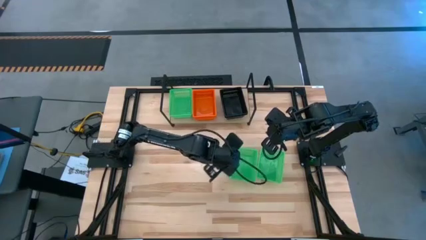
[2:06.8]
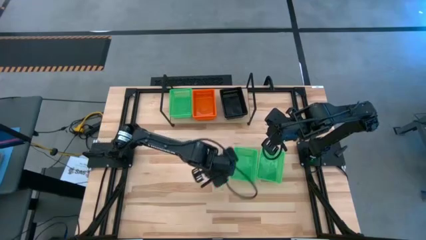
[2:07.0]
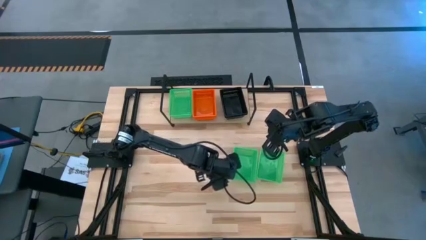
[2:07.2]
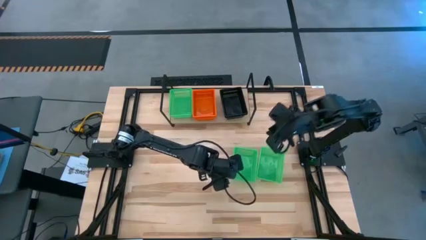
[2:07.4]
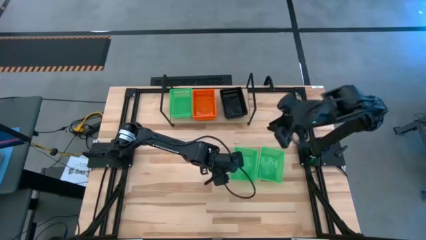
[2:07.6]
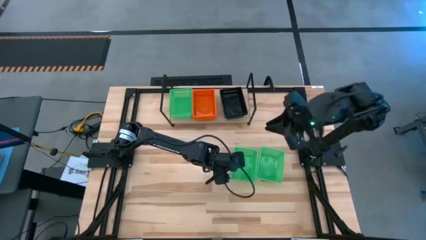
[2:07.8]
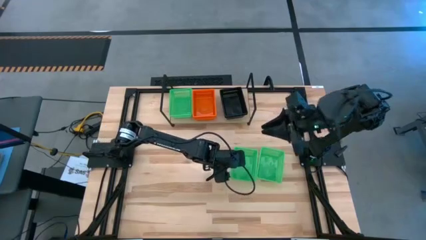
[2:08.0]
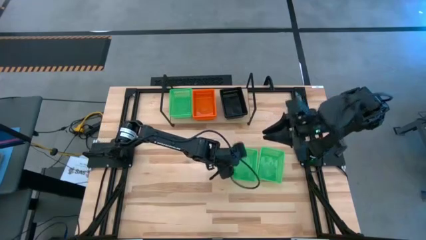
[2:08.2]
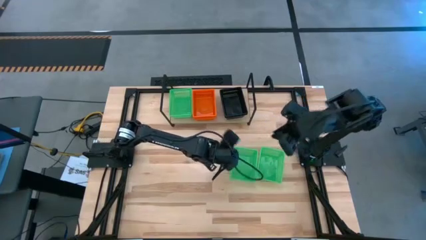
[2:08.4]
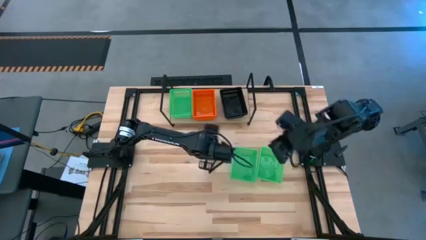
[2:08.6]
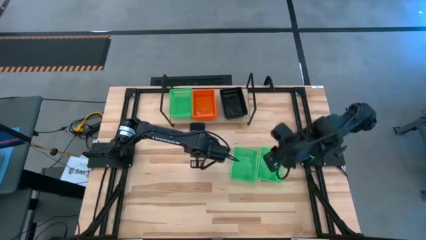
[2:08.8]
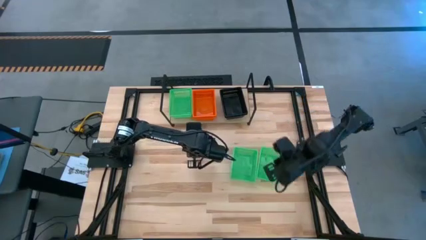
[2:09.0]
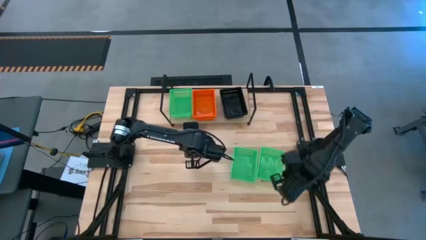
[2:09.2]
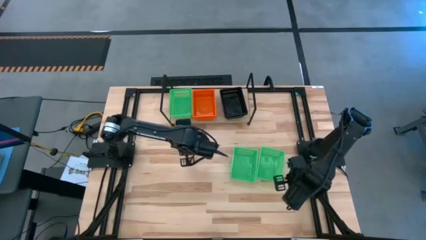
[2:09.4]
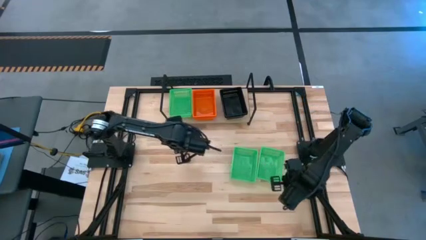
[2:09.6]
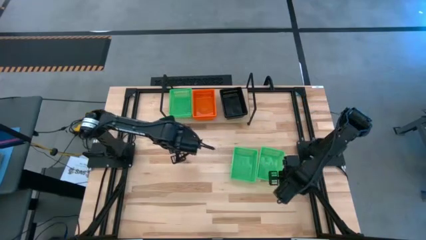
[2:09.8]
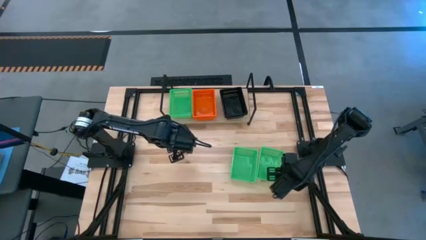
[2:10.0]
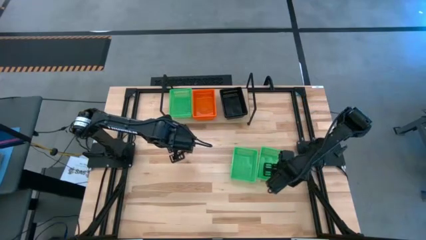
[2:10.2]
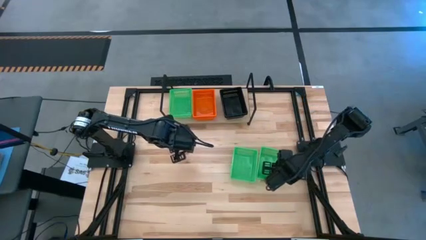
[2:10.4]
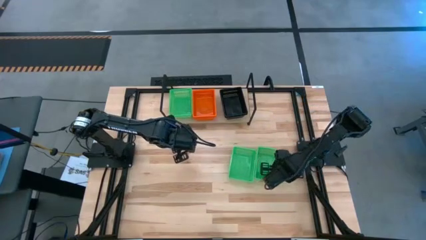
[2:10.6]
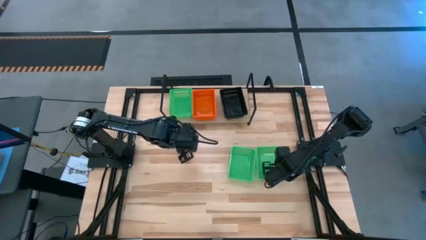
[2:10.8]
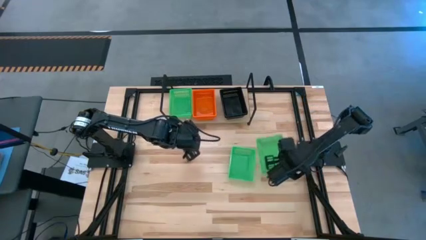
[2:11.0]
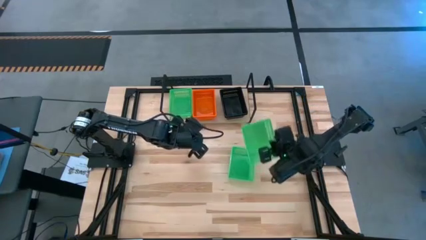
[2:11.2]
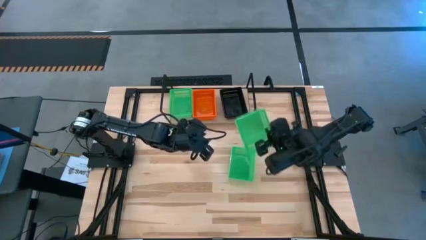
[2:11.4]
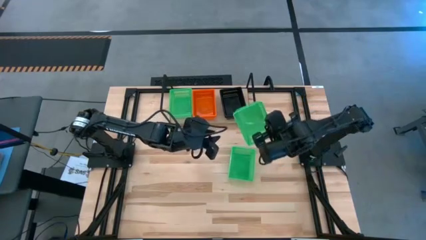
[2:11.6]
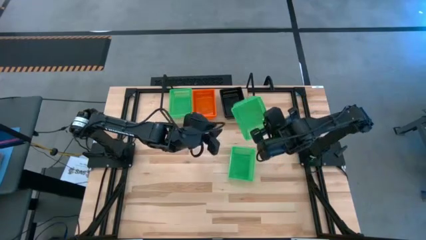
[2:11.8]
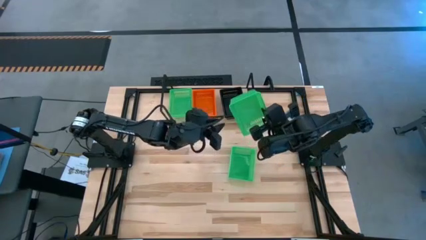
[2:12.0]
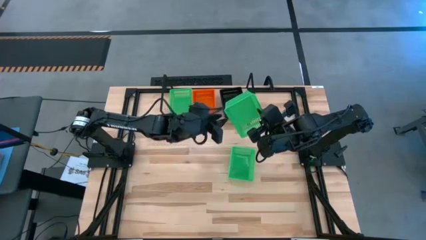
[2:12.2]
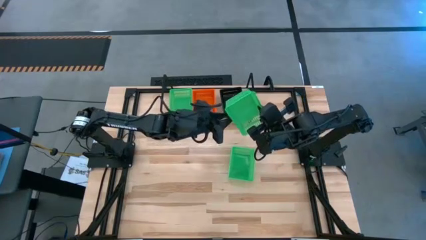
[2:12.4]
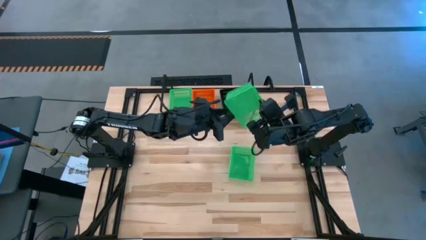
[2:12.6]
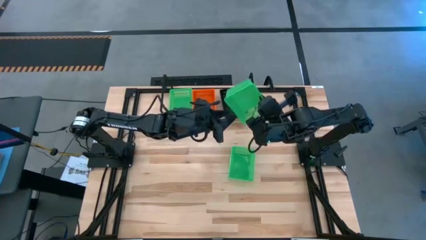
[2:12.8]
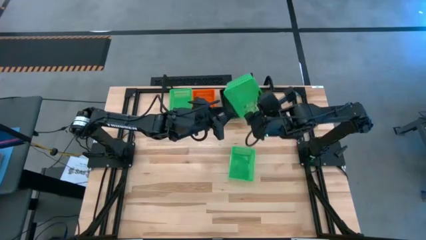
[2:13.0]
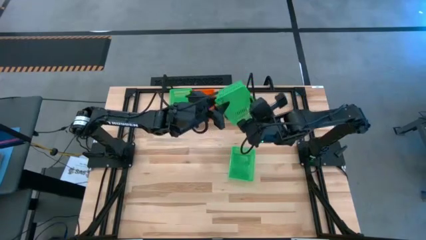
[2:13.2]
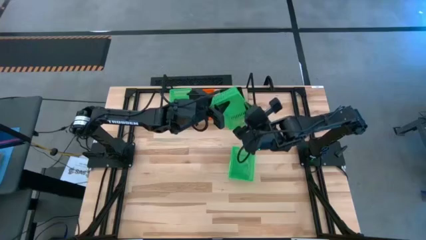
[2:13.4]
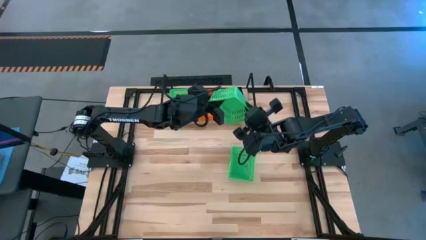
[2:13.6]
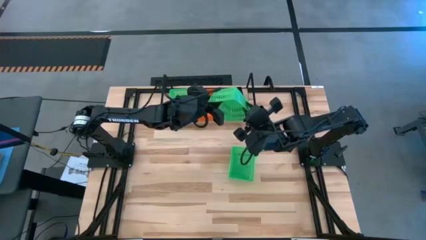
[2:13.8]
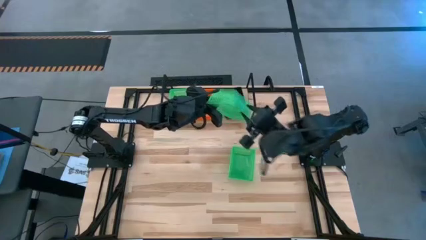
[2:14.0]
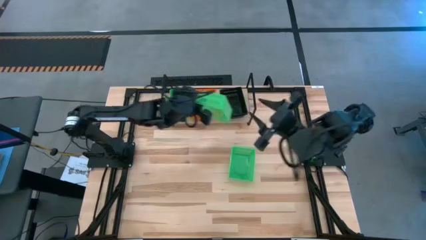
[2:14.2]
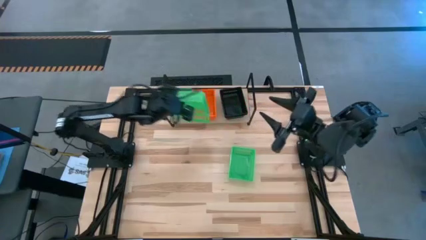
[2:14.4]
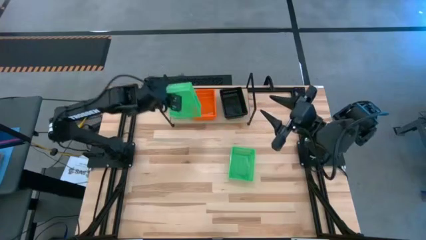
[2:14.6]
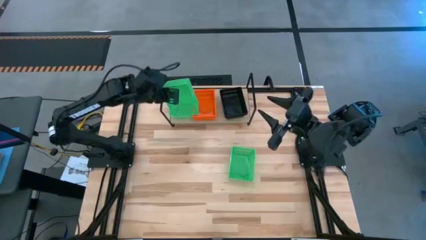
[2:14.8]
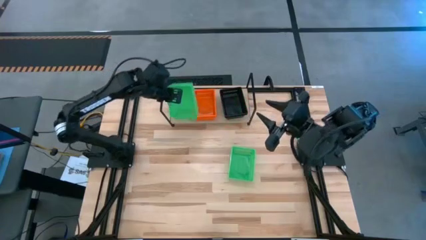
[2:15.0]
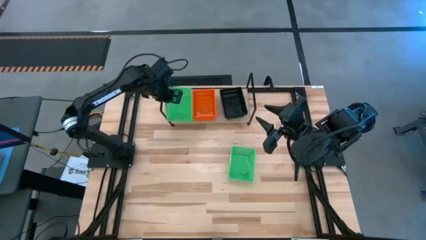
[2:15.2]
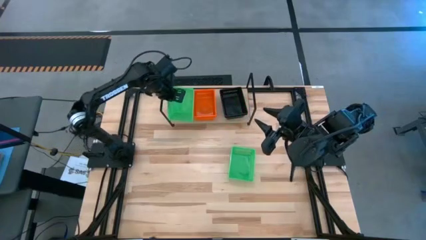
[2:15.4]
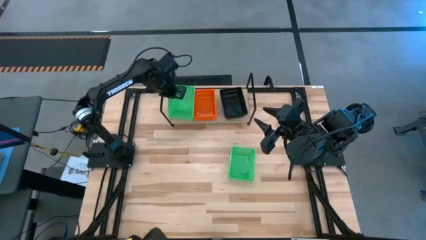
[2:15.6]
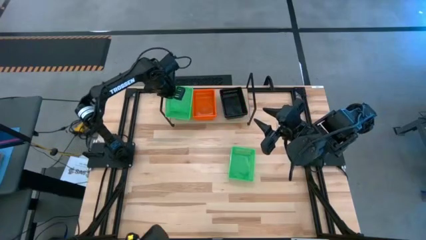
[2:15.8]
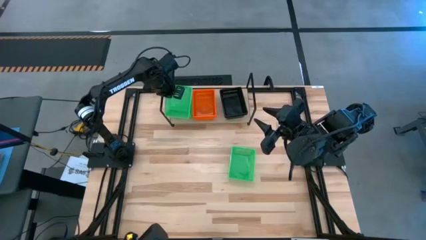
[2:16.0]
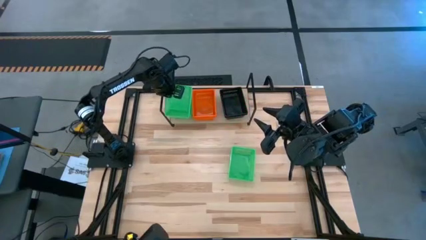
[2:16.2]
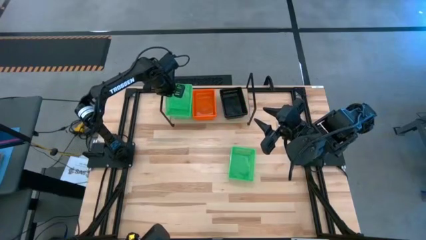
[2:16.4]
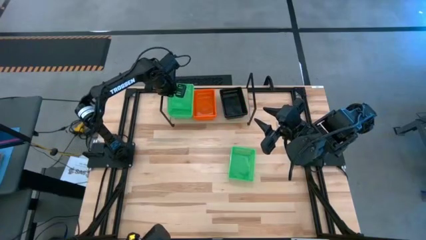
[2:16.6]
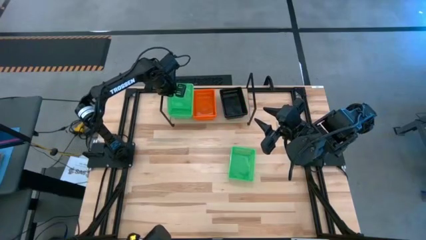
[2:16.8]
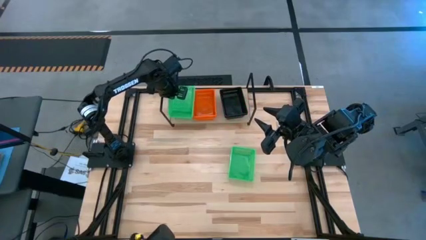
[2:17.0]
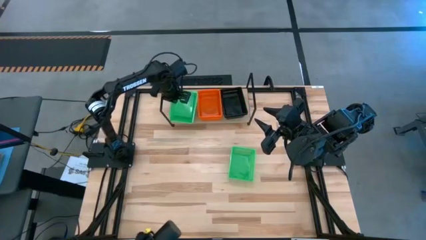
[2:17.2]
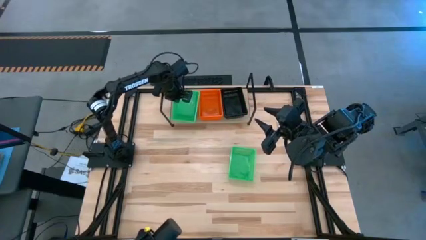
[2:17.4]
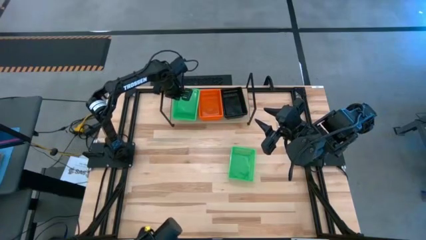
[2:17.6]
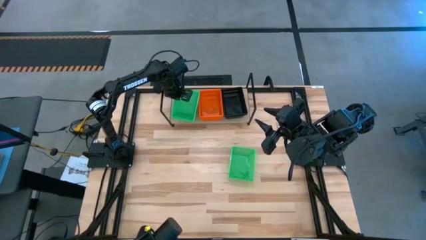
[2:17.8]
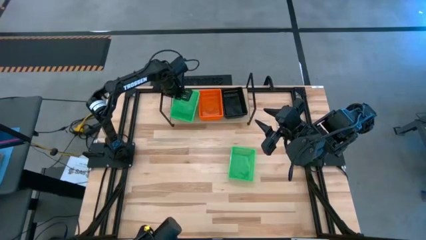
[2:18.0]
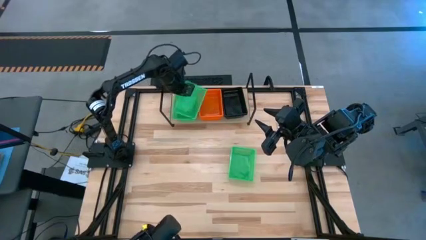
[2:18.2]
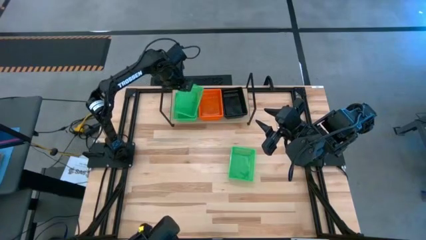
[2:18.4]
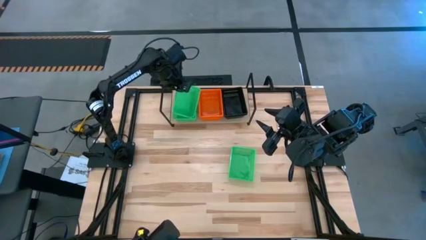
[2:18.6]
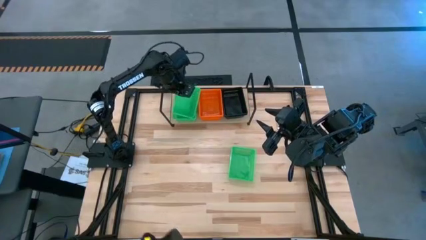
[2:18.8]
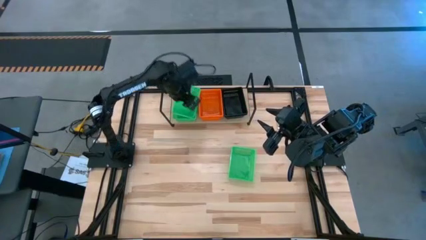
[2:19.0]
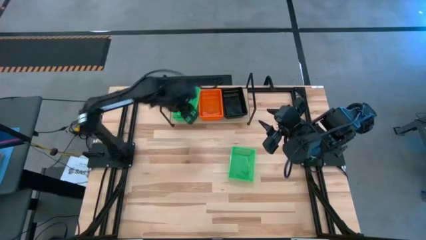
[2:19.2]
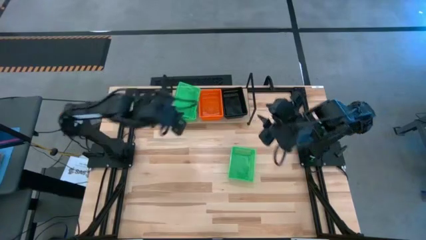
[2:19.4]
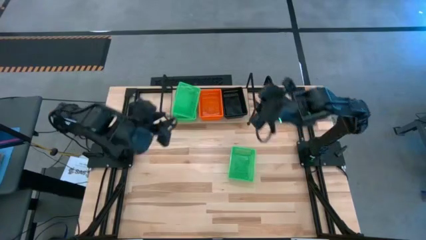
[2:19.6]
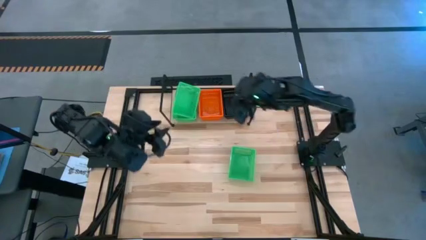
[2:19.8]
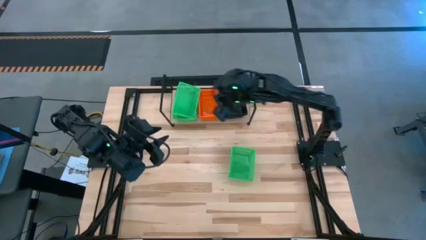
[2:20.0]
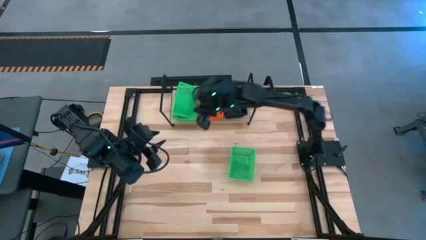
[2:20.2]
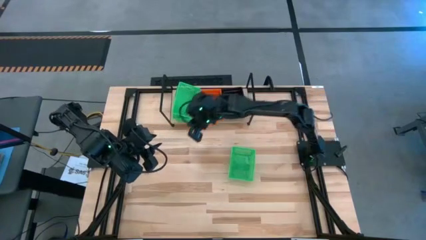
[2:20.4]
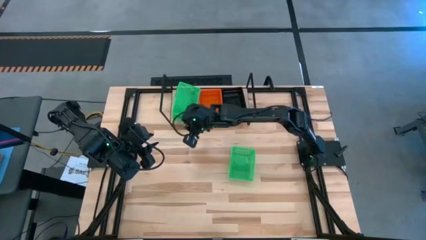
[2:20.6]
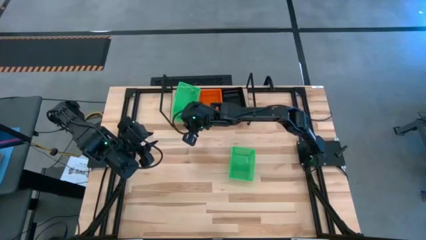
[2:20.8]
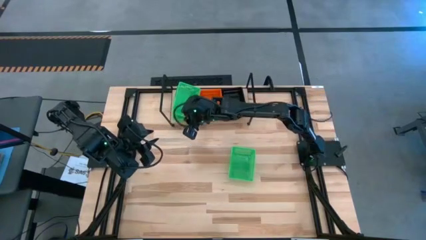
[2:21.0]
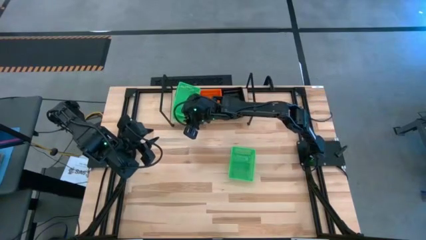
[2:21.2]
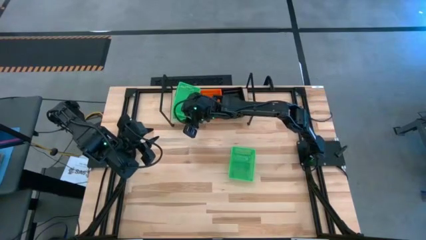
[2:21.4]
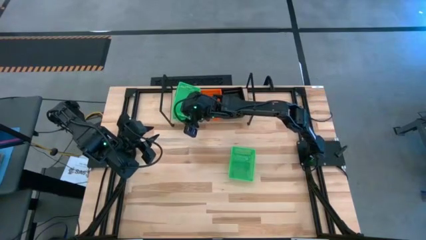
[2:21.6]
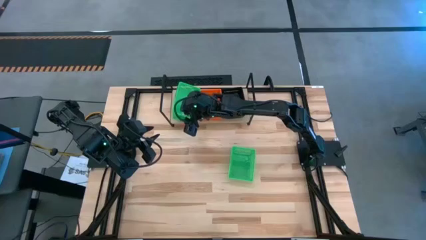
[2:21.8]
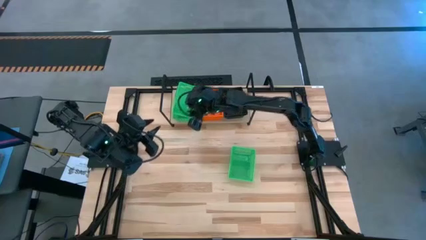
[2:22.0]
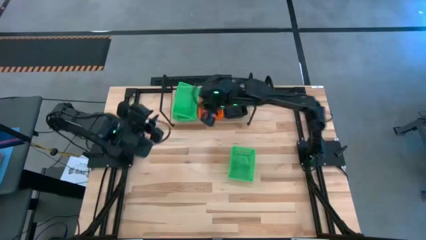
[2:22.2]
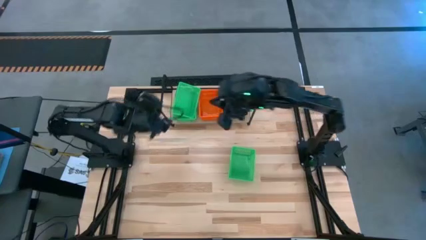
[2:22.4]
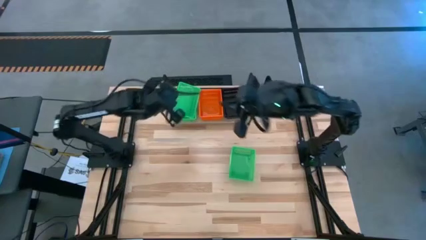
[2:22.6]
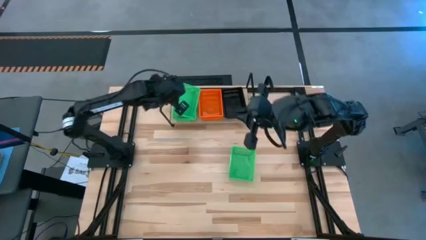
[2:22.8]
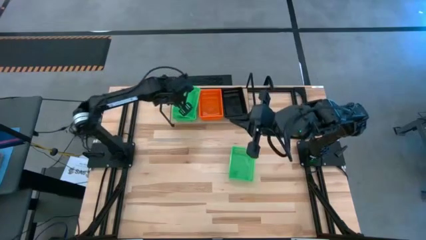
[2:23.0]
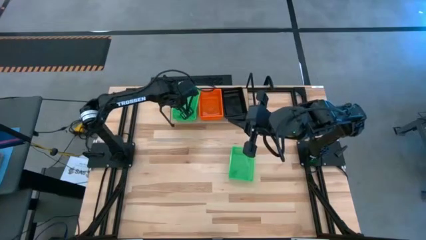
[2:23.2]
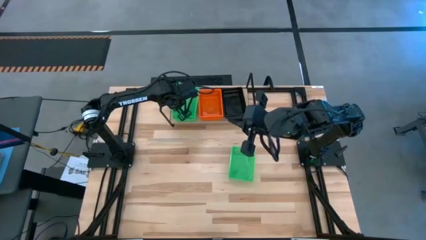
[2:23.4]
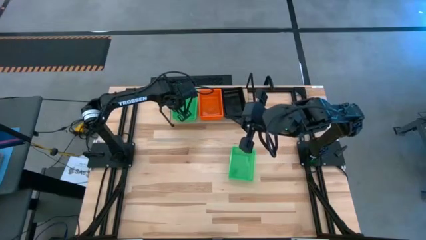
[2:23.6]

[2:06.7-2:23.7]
Task: Stack baskets on shelf by color
Stack the right green bin on top of the green bin on the shelf
